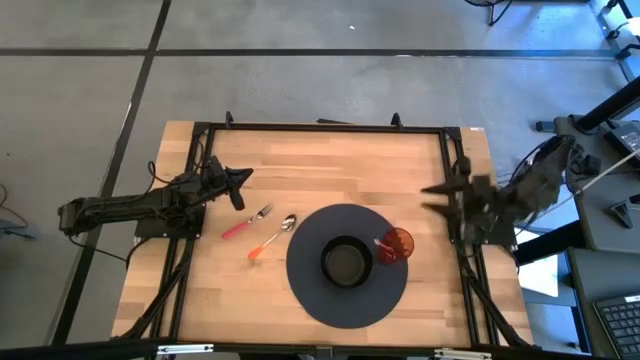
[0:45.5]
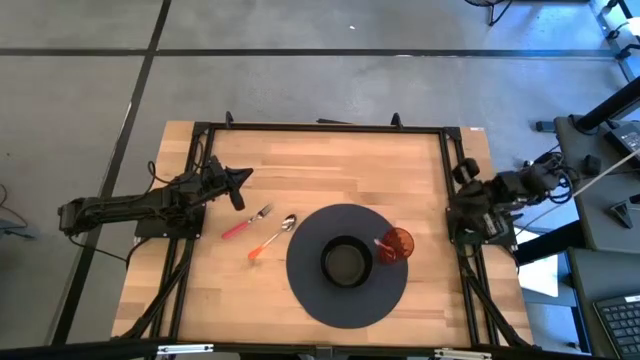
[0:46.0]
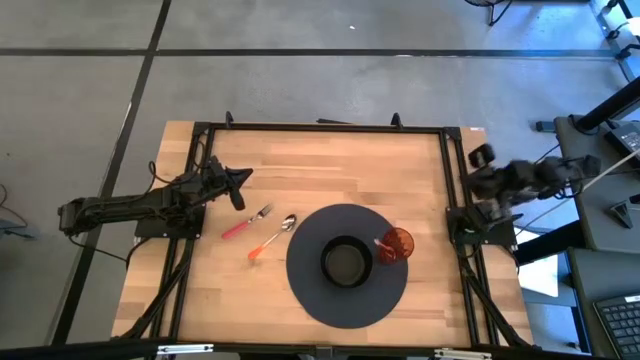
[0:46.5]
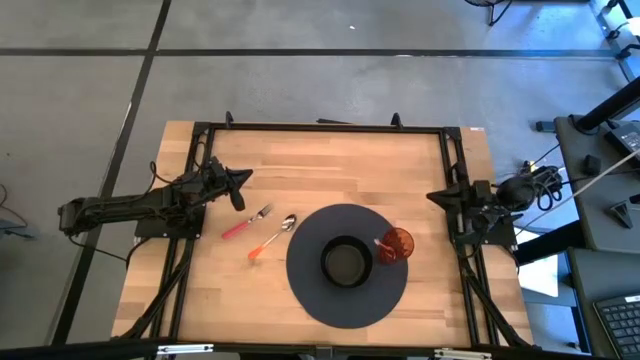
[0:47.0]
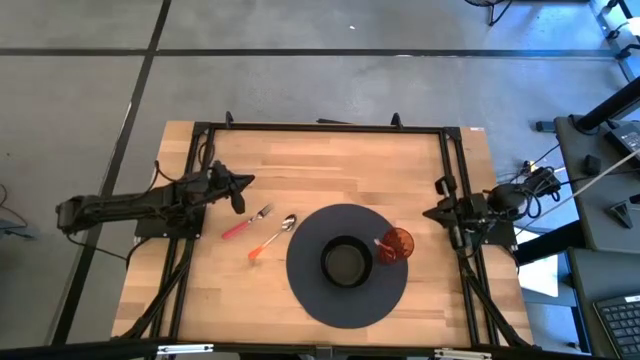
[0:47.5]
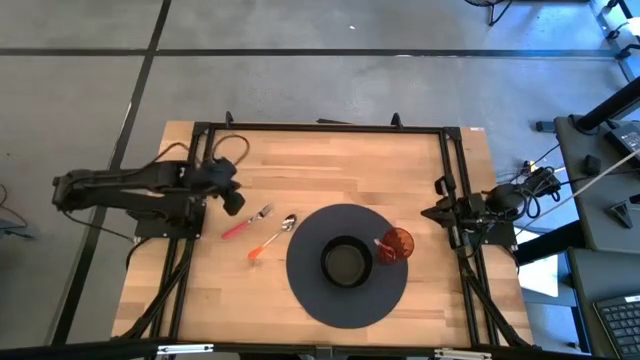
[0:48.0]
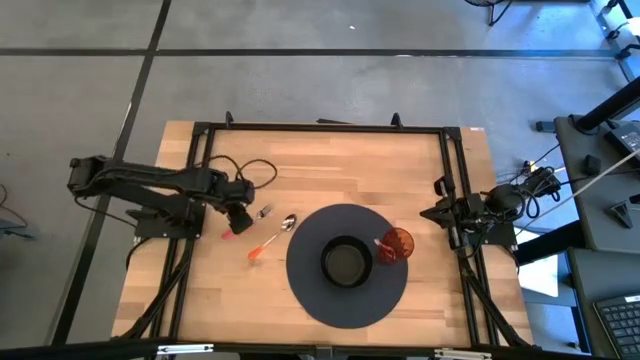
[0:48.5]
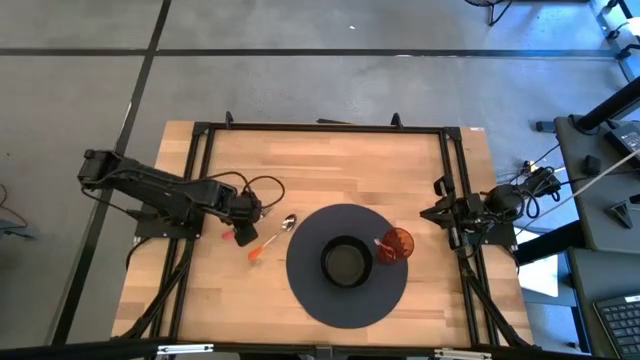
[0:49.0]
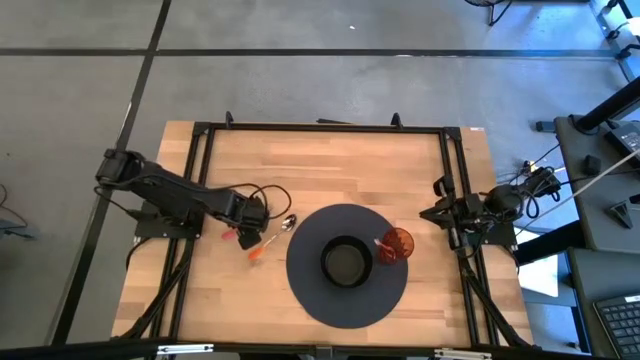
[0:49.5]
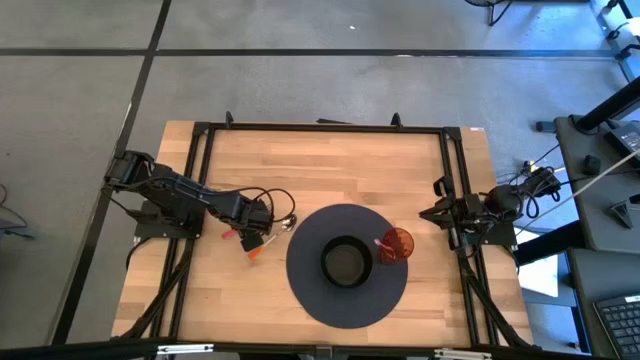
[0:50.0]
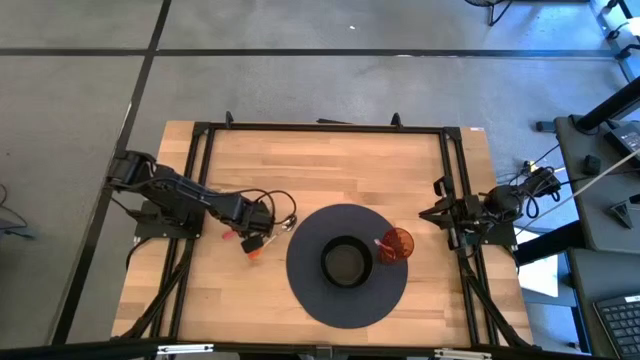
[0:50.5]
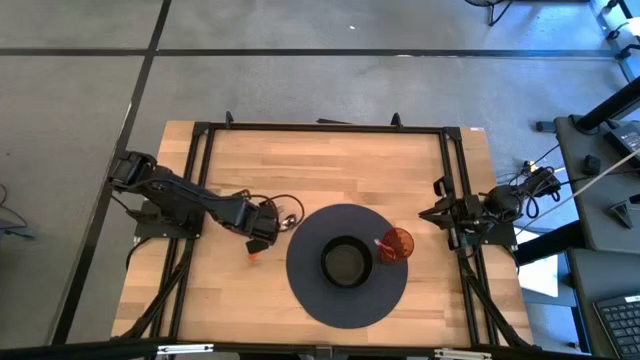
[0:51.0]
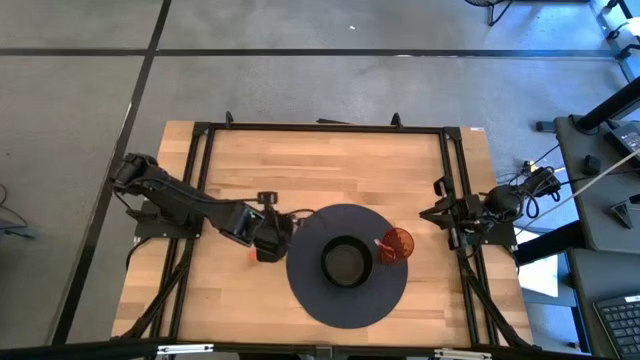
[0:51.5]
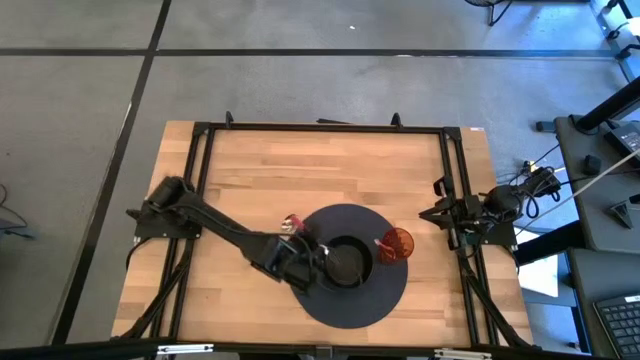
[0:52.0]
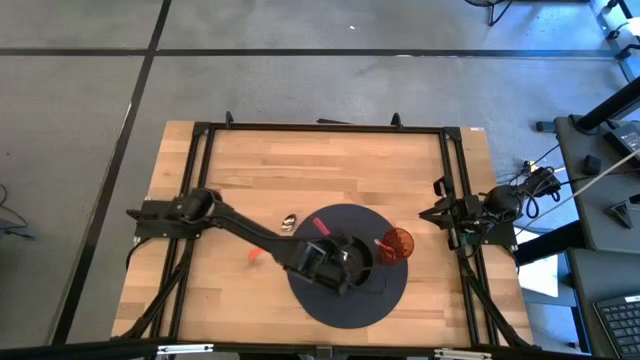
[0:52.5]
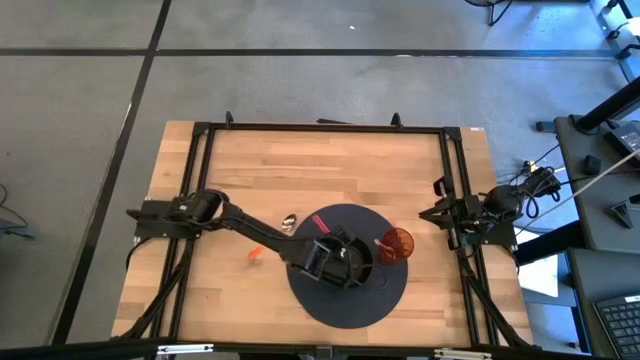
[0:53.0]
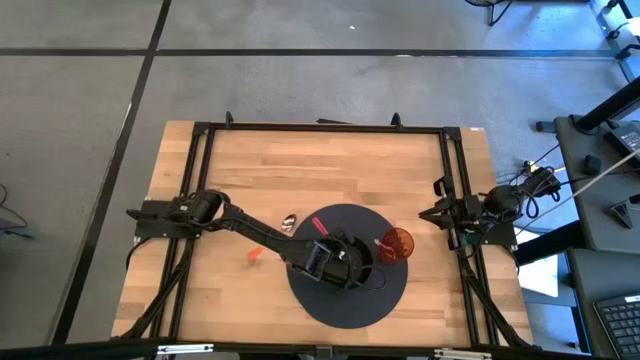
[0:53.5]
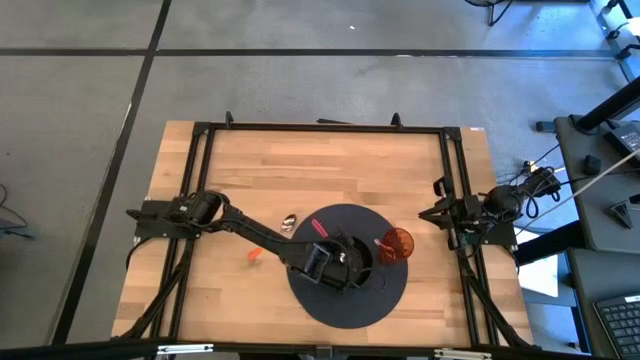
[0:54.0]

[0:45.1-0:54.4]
Task: Pick & Place Utensil
Put the pink fork into the black bowl

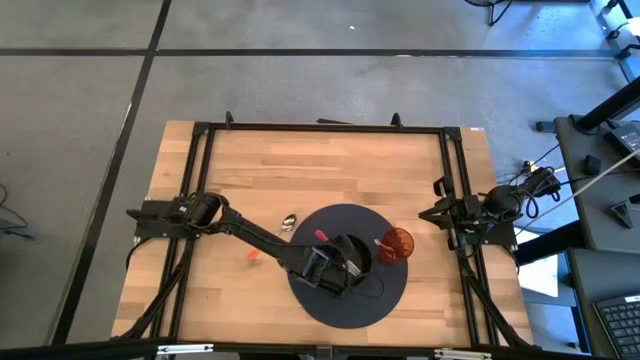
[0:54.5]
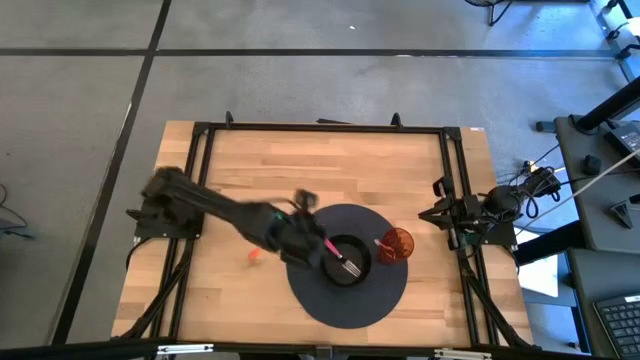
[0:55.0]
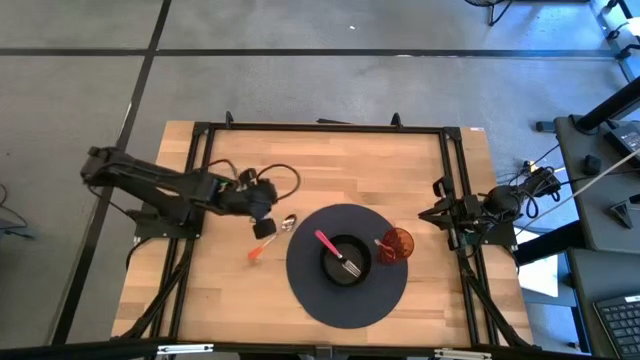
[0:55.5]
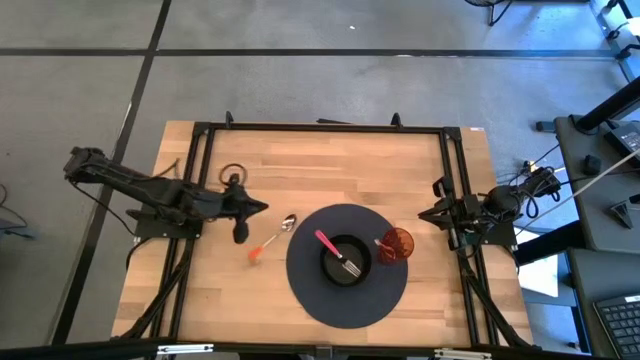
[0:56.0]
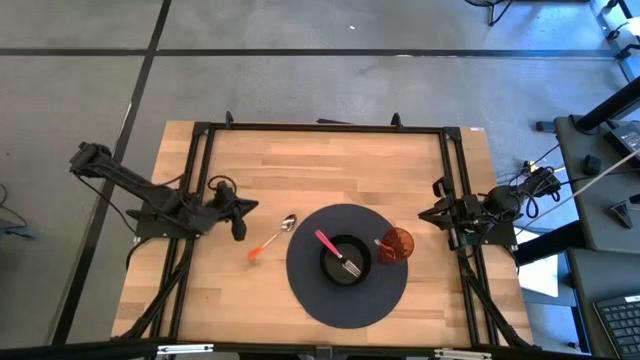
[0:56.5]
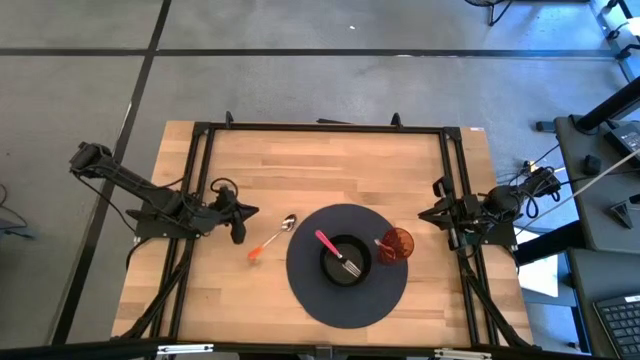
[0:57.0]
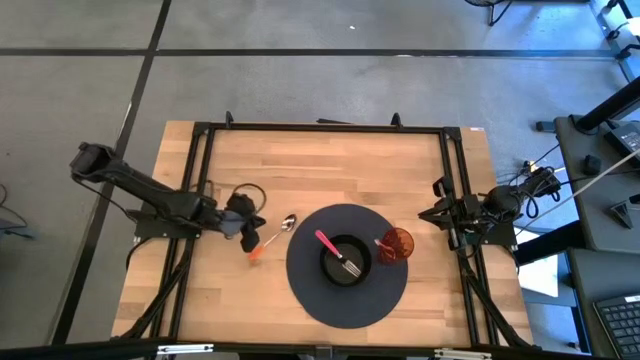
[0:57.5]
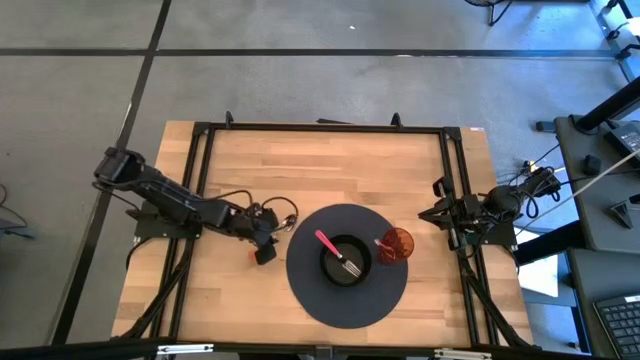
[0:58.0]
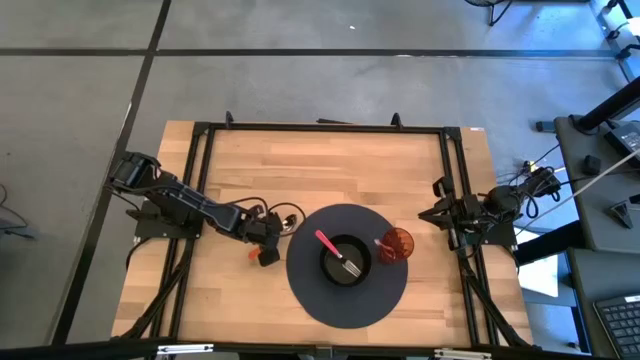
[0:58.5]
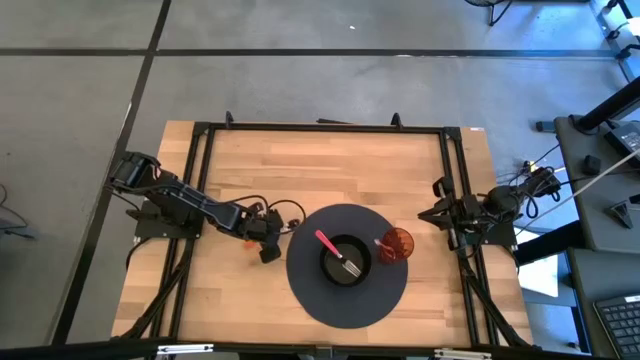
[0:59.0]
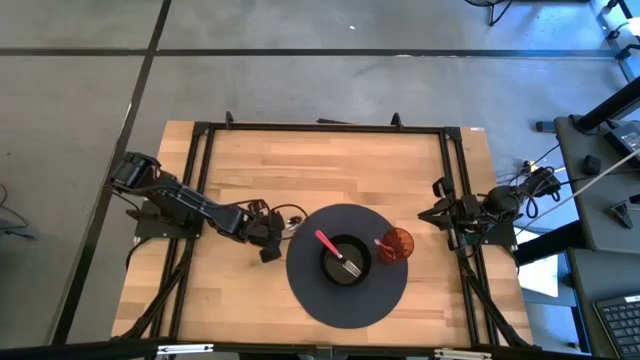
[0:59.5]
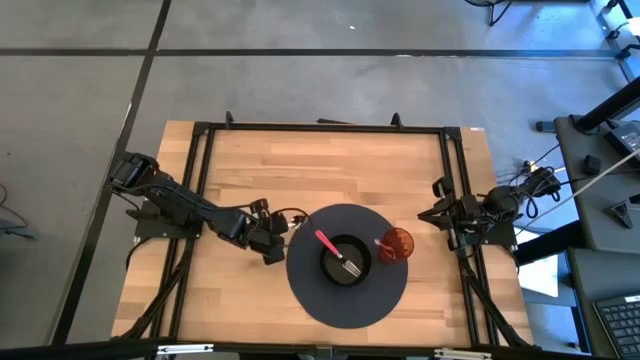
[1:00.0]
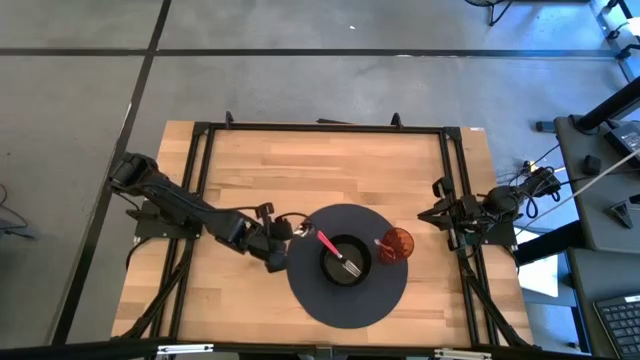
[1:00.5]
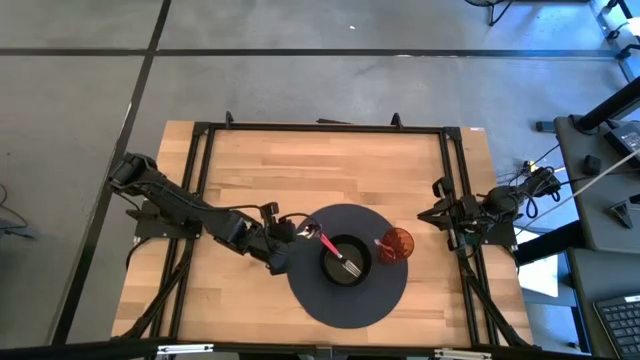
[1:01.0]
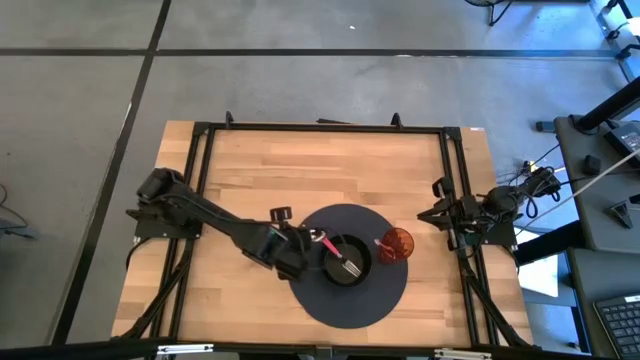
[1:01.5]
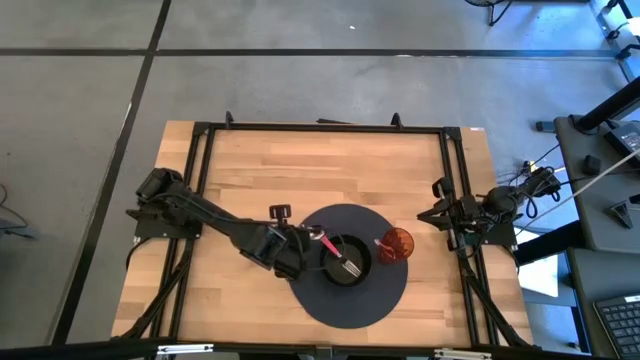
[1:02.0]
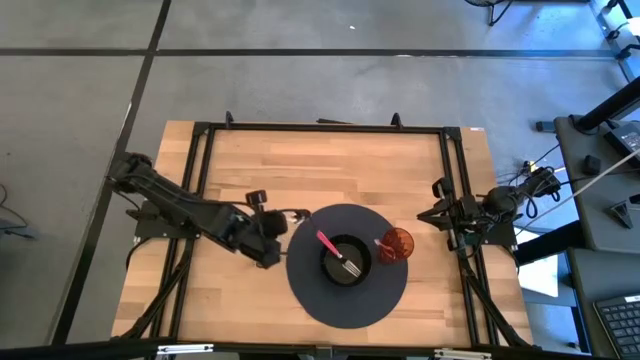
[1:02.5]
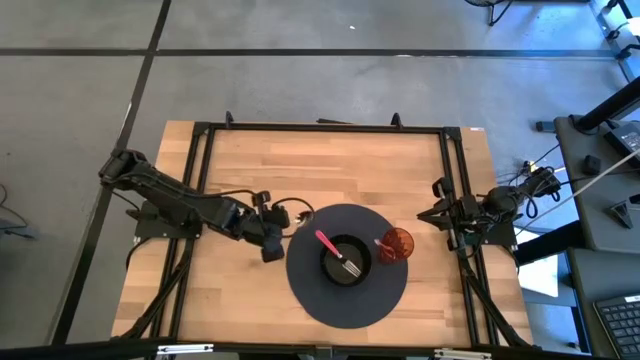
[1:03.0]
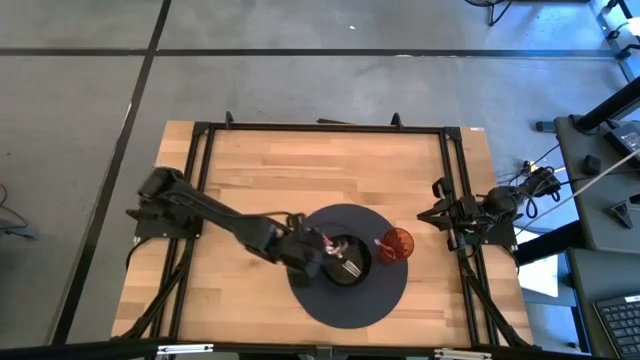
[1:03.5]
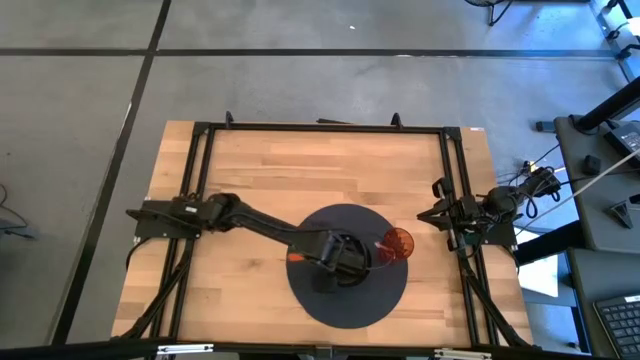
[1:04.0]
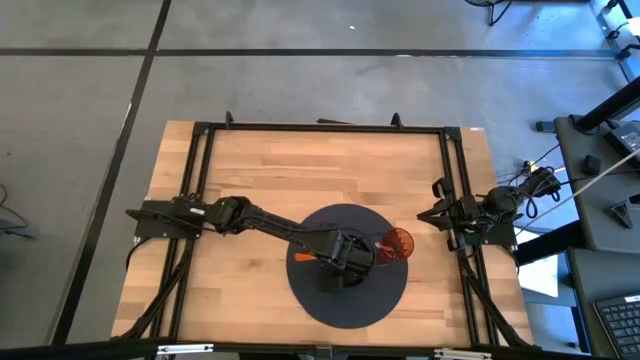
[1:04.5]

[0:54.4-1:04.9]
Put the orange spoon into the black bowl
